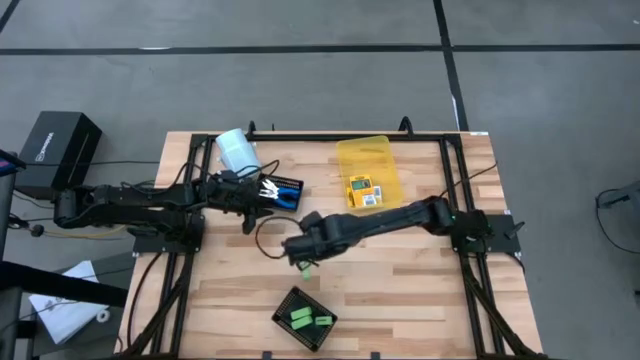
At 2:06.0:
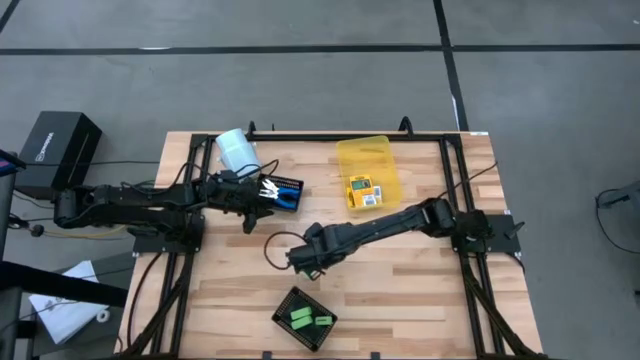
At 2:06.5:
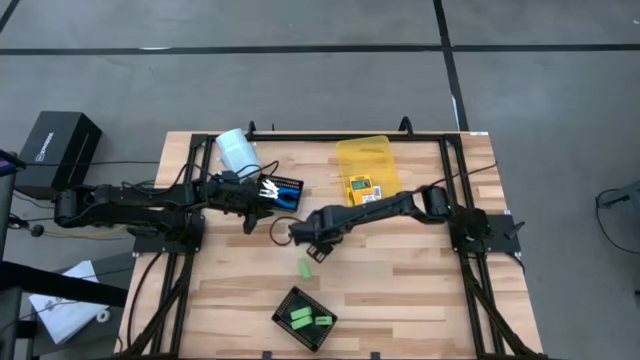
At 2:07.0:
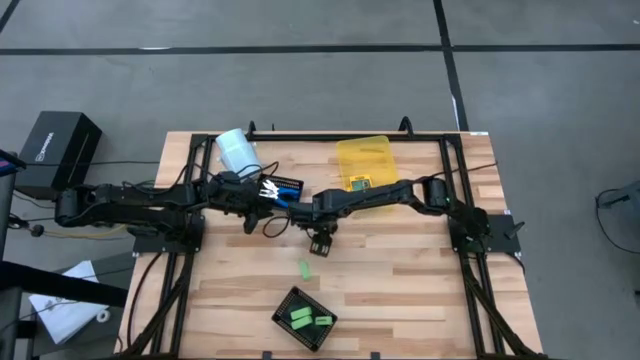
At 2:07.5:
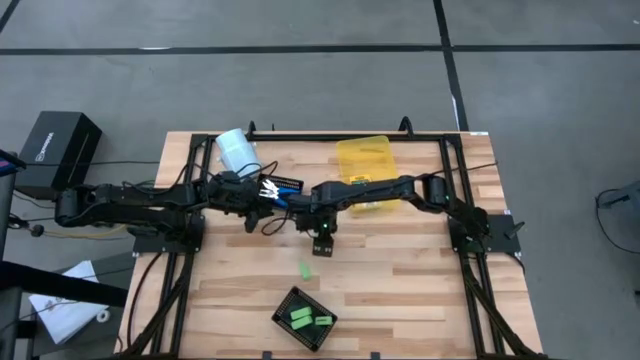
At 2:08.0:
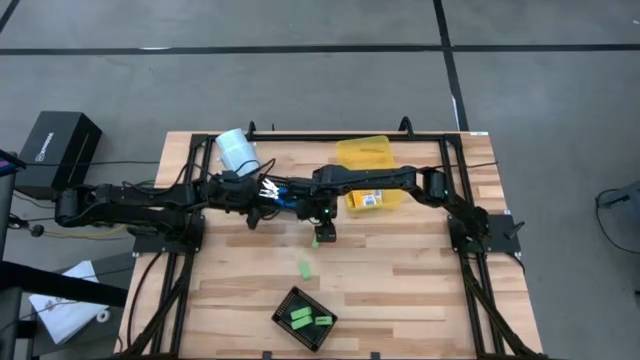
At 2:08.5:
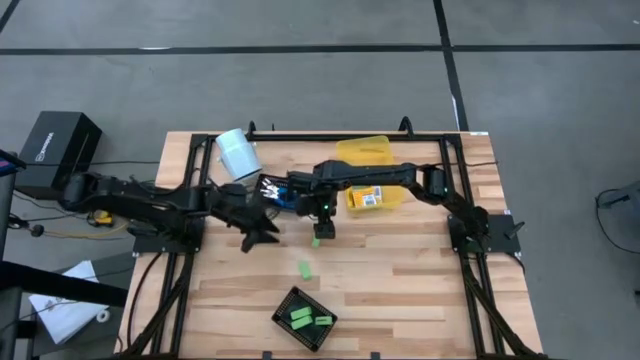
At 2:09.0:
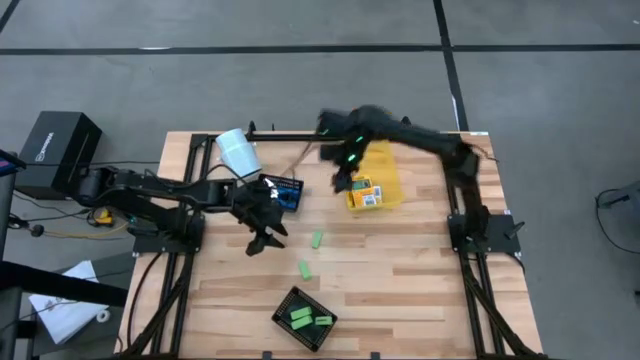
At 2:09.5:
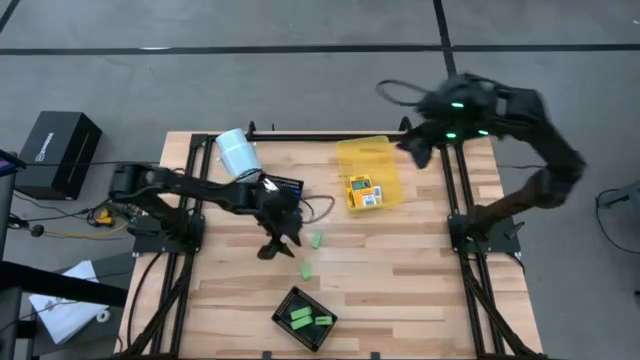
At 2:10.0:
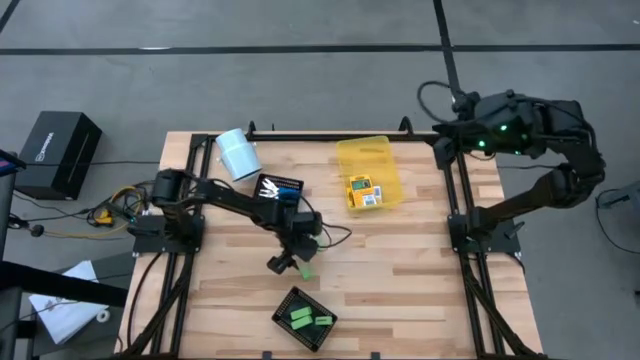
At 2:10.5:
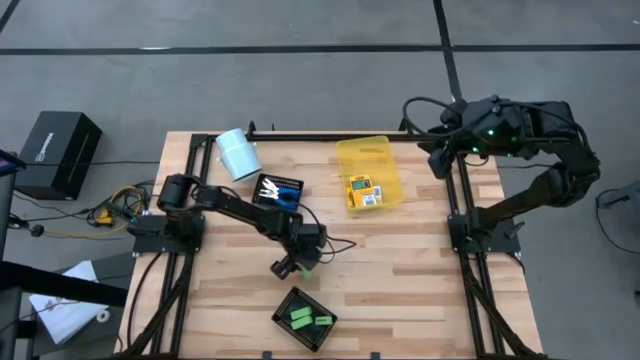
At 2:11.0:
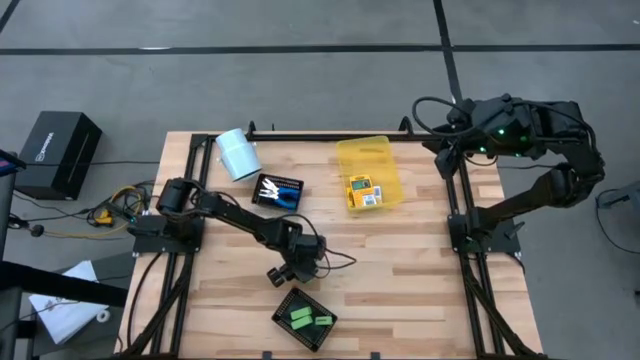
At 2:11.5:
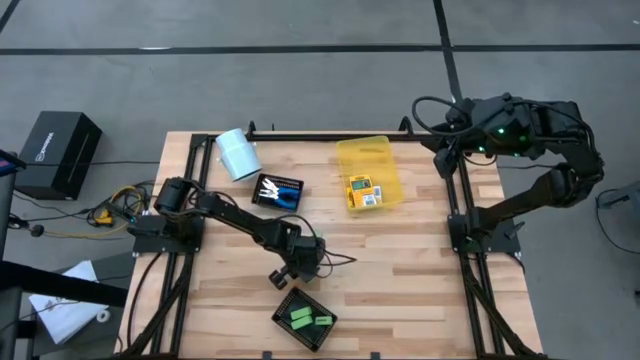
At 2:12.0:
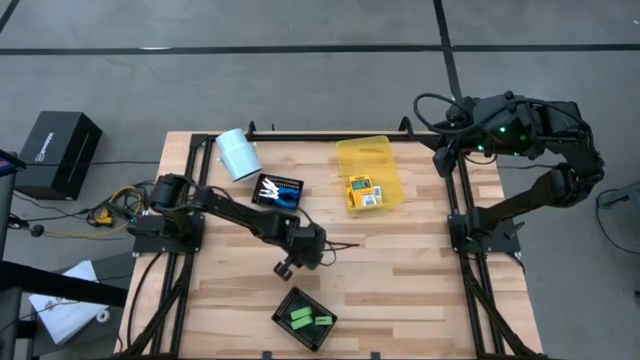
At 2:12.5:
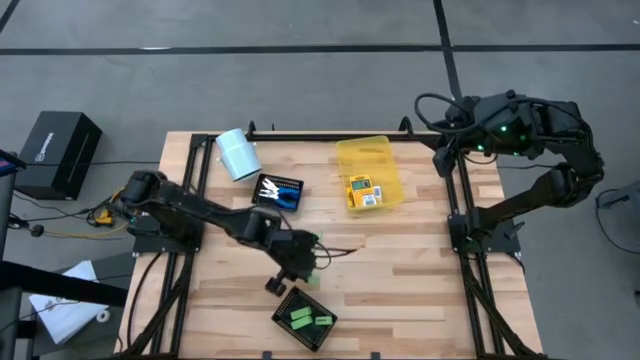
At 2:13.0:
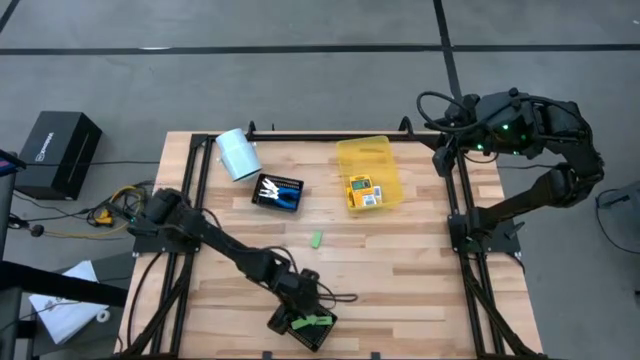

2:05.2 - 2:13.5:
Task: Pick & Place School Supplies
Put the green eraser into the bottom black bin

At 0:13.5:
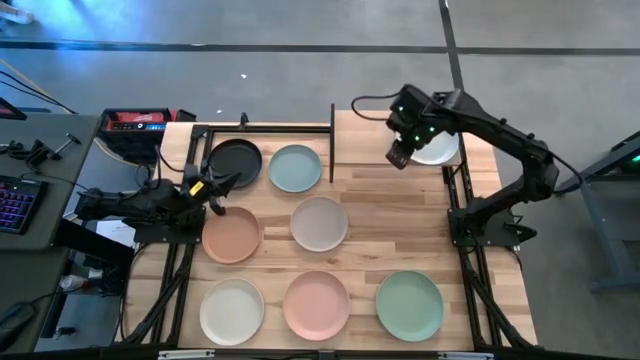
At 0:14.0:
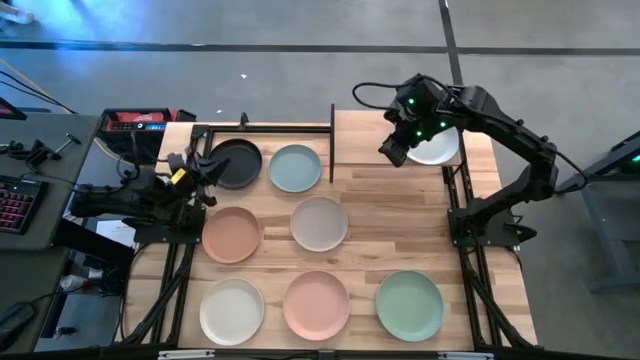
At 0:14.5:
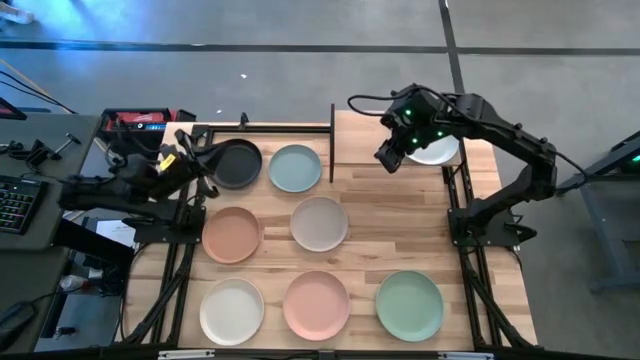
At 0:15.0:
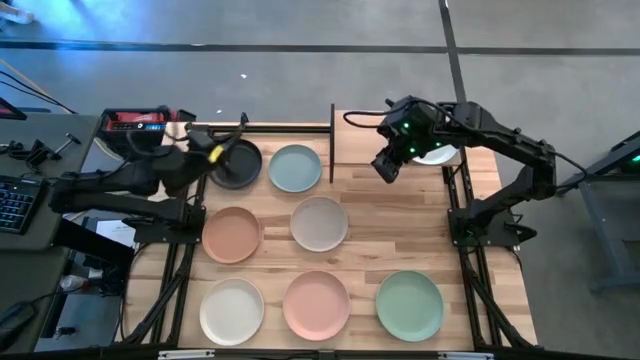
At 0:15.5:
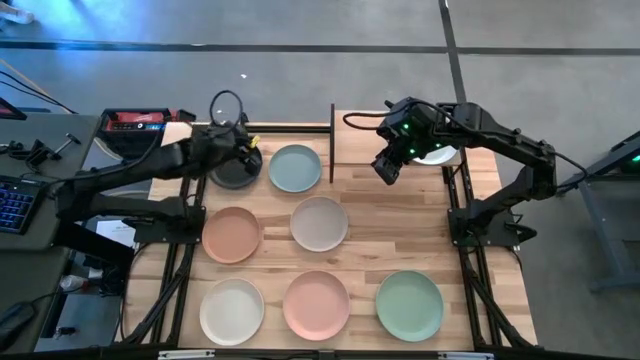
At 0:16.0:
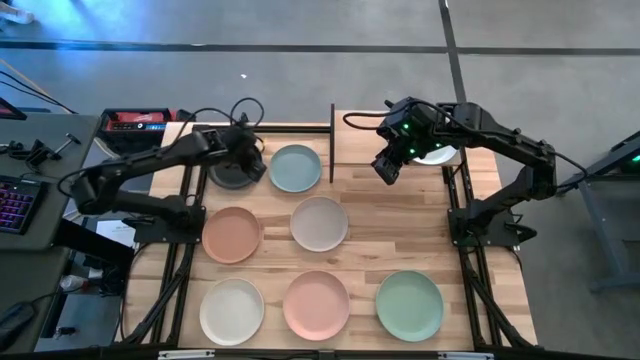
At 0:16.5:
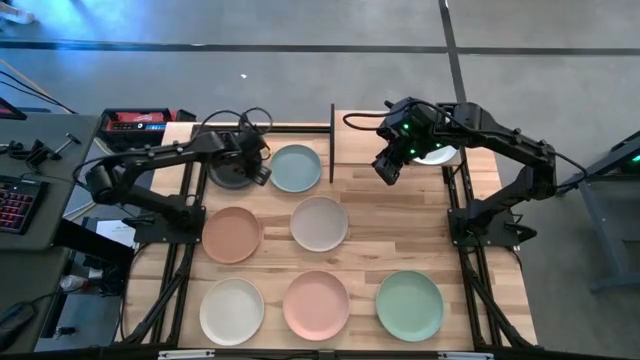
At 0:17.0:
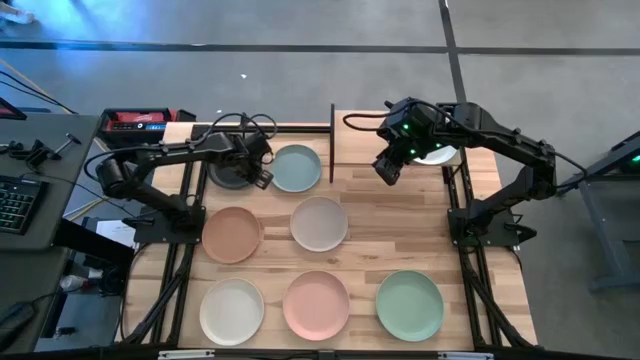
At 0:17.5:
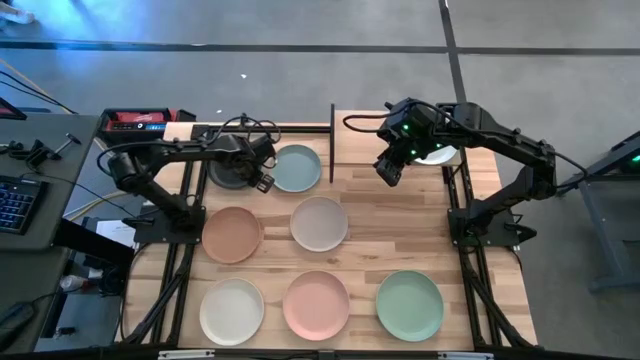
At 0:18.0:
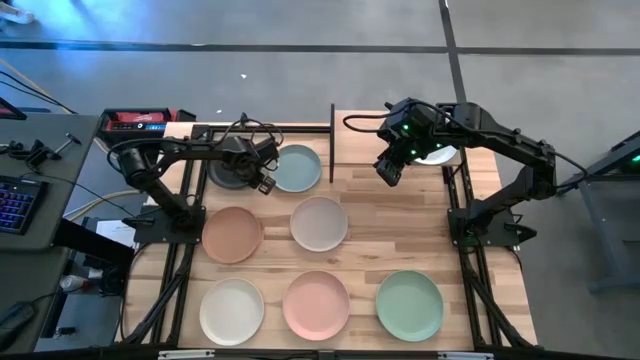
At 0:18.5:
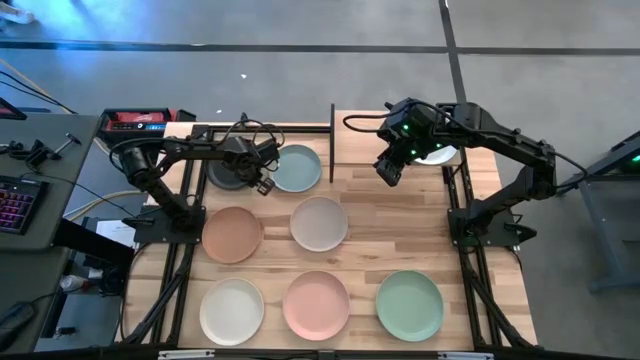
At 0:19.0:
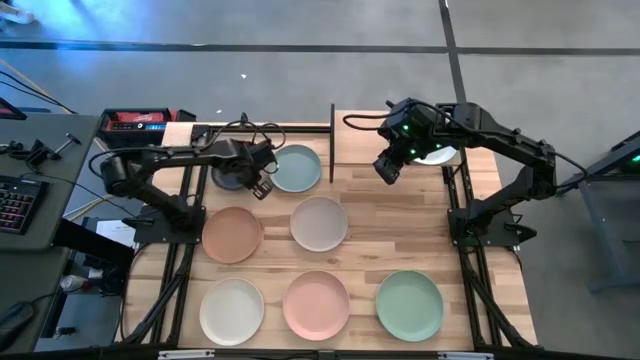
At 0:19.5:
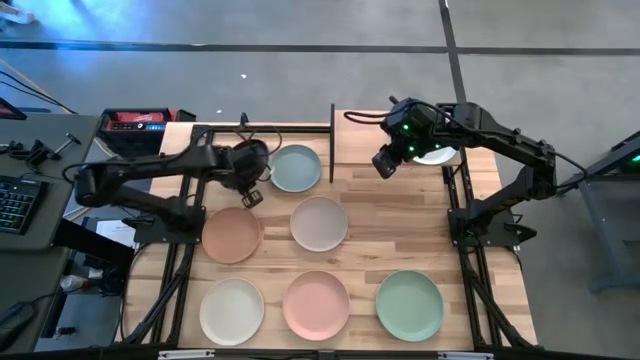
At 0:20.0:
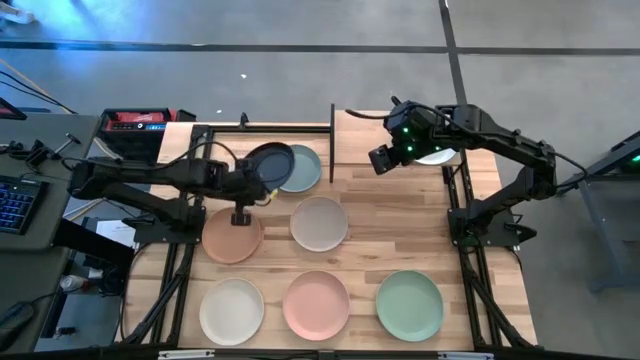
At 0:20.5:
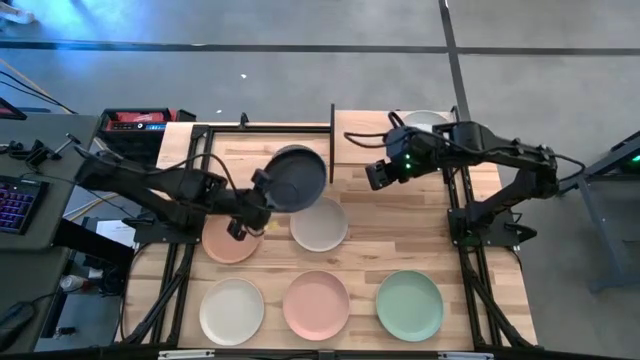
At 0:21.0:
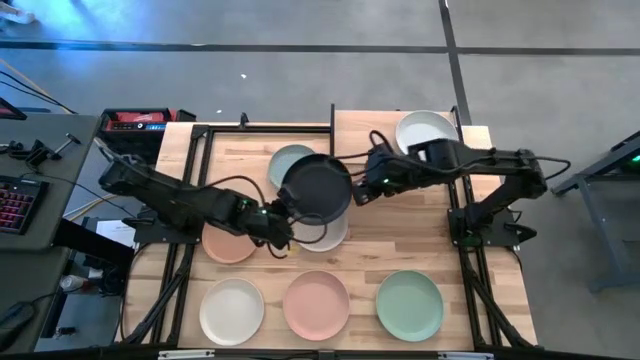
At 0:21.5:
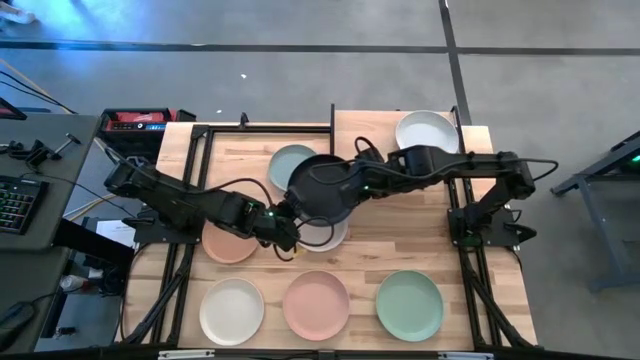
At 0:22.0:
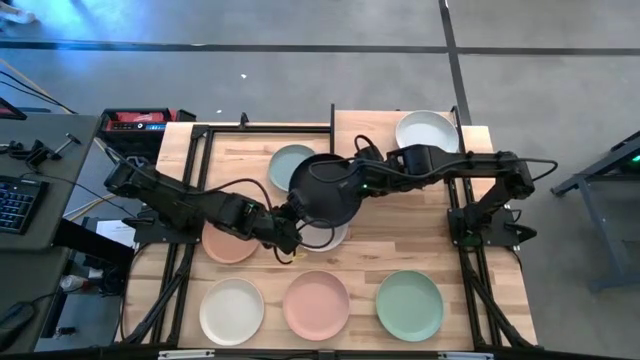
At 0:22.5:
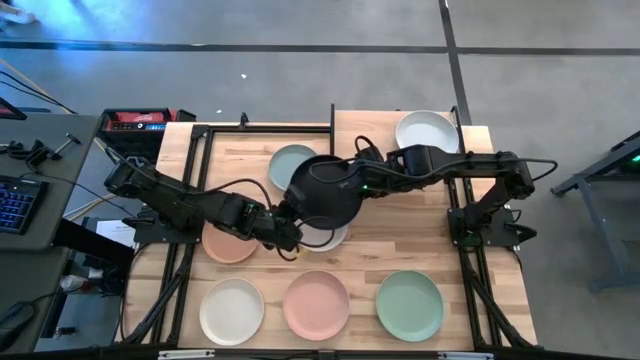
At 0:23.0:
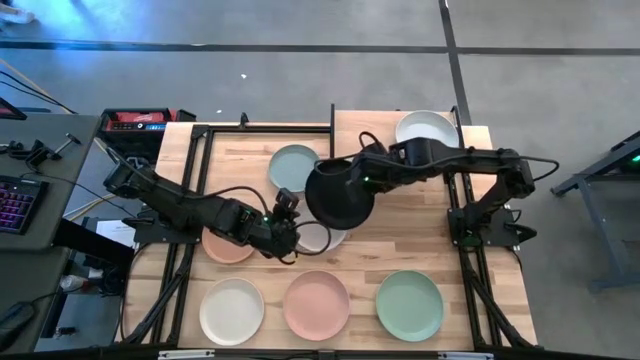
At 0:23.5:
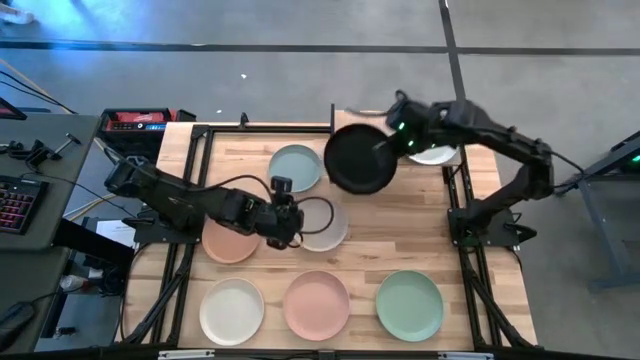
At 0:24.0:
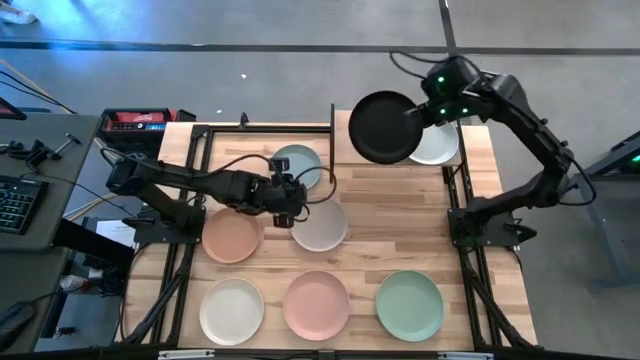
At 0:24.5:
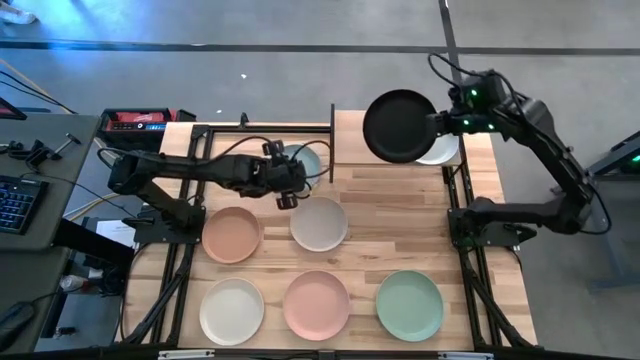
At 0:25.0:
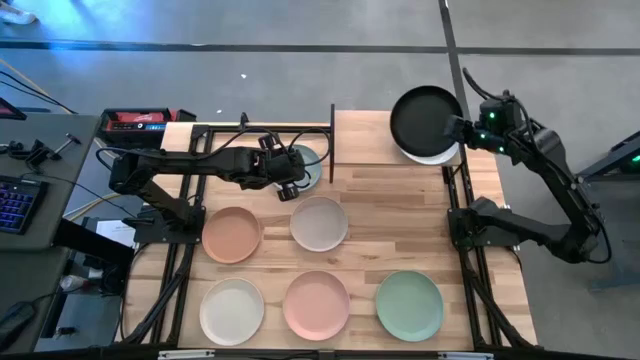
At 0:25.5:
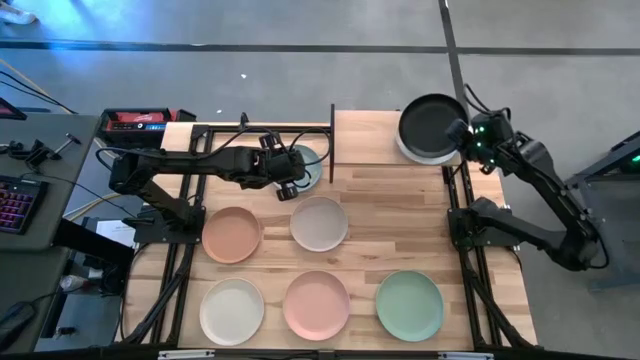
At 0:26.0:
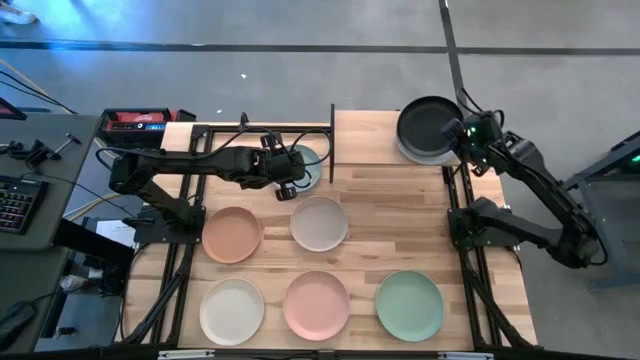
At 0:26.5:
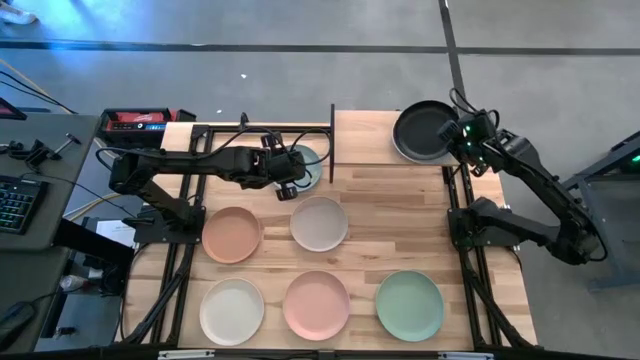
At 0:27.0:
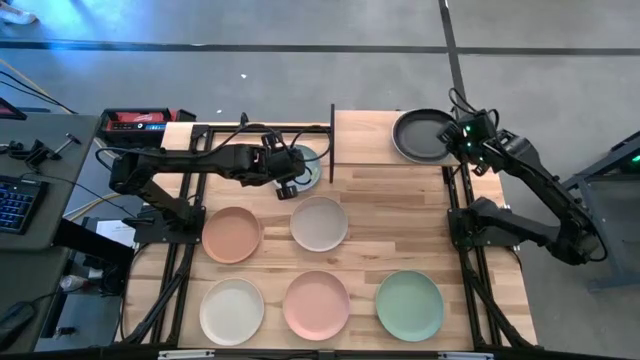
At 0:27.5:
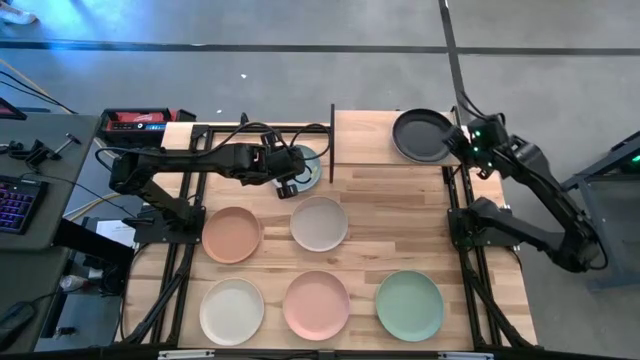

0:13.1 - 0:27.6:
Task: Place and stack plates onto a shelf
Stack the black plate on the top of the white plate on the shelf
